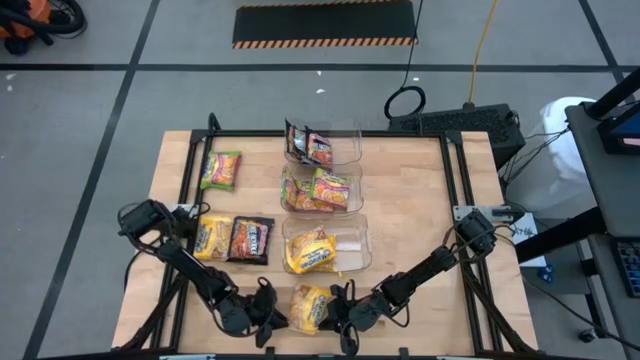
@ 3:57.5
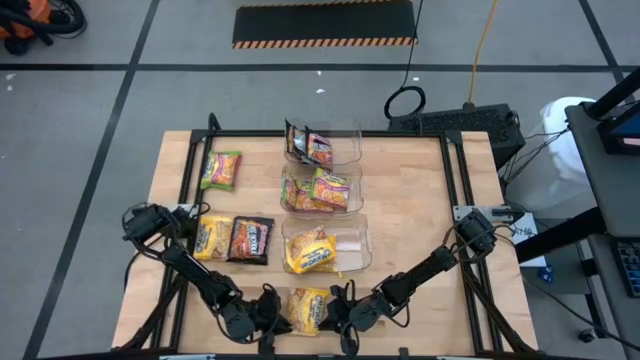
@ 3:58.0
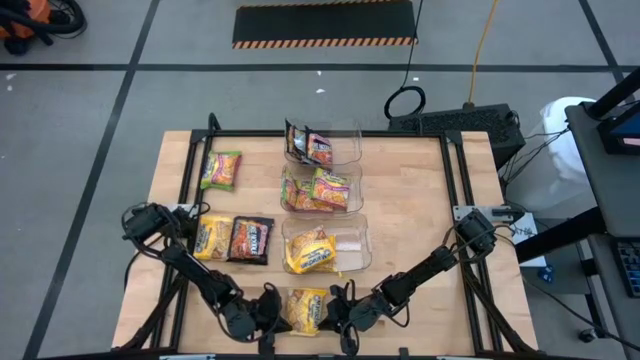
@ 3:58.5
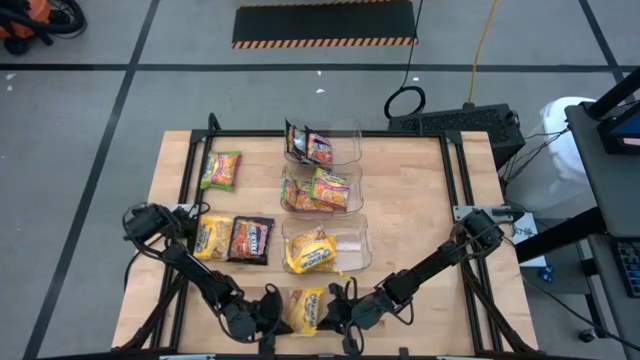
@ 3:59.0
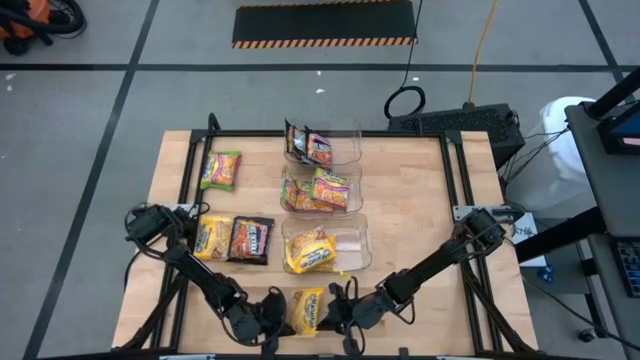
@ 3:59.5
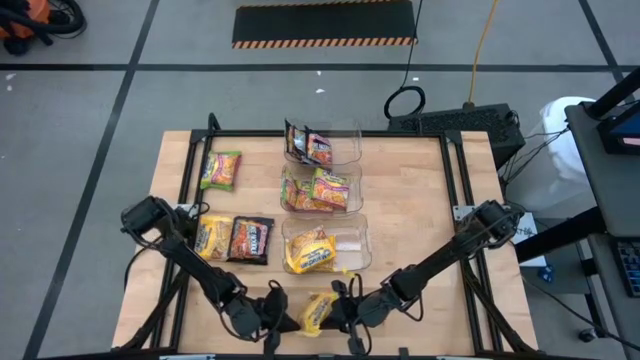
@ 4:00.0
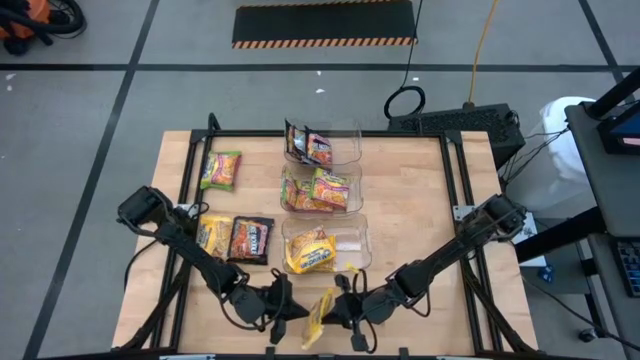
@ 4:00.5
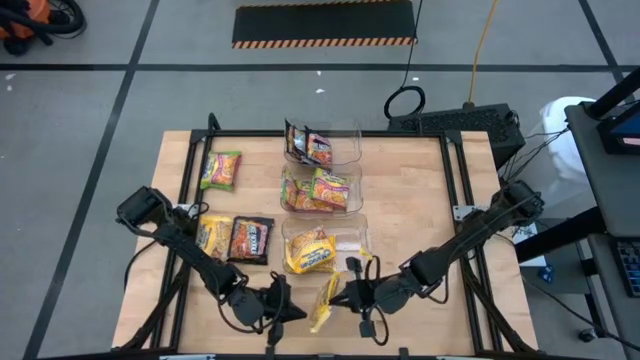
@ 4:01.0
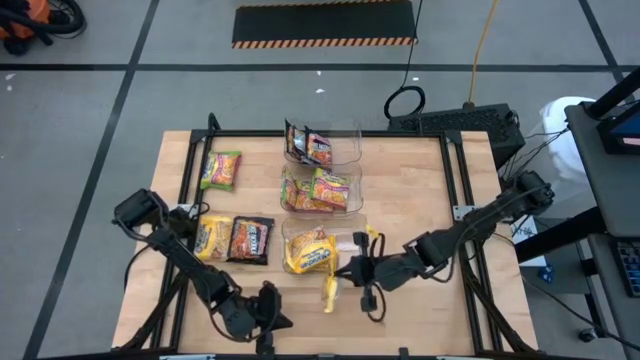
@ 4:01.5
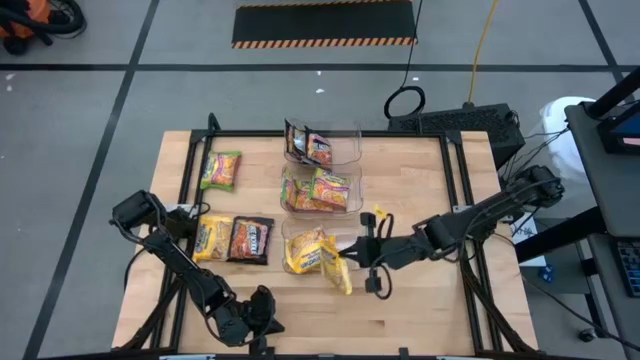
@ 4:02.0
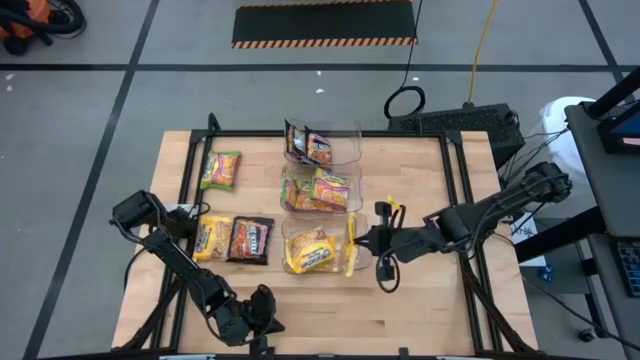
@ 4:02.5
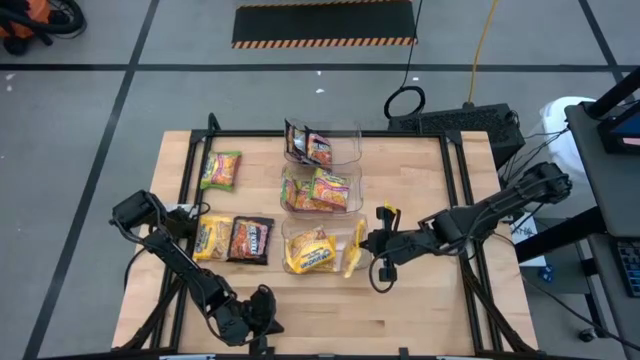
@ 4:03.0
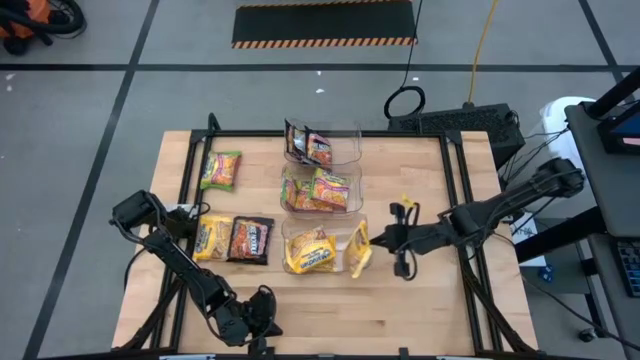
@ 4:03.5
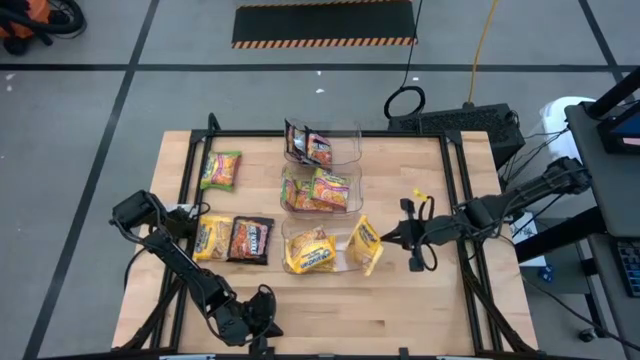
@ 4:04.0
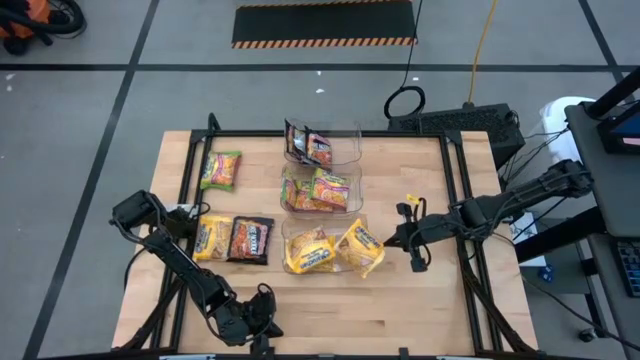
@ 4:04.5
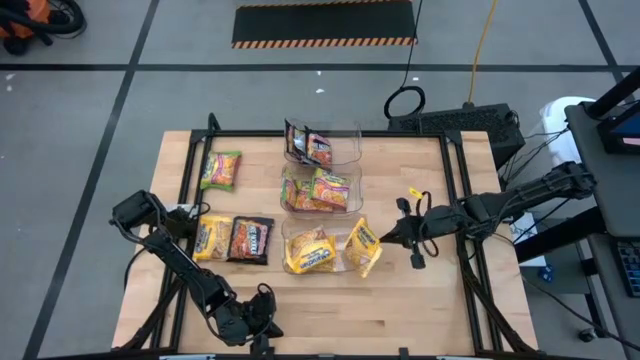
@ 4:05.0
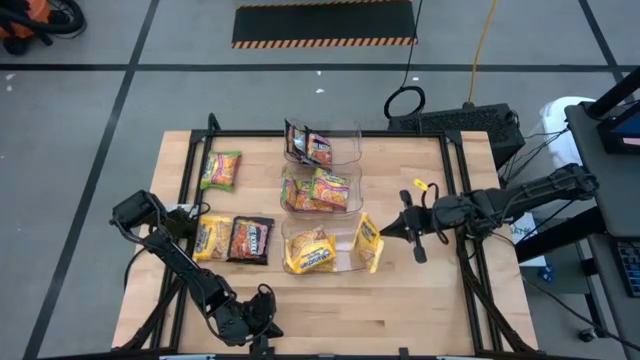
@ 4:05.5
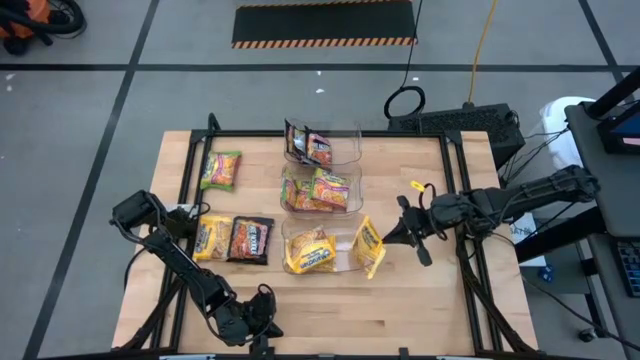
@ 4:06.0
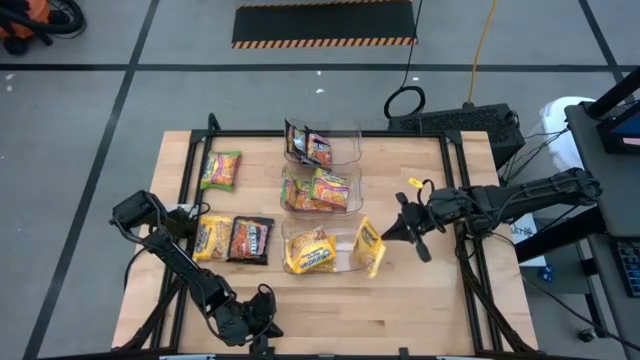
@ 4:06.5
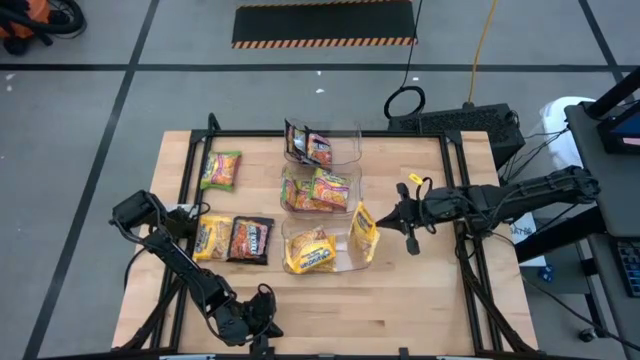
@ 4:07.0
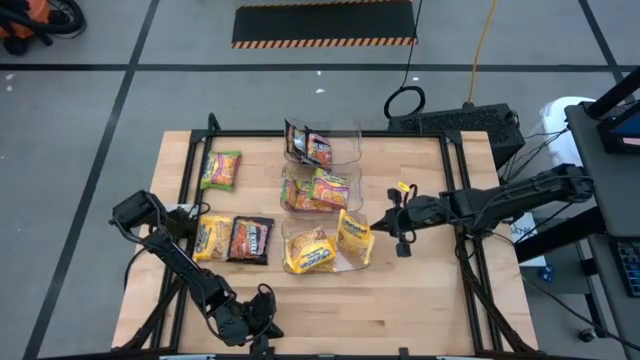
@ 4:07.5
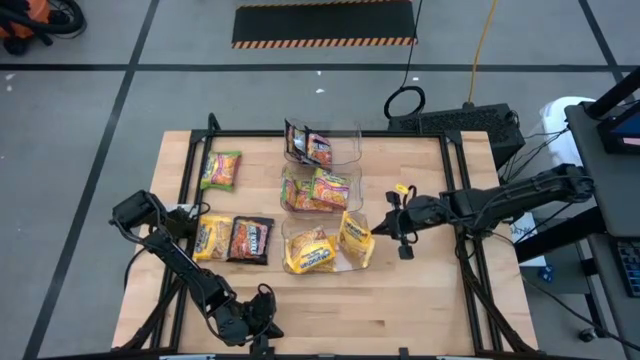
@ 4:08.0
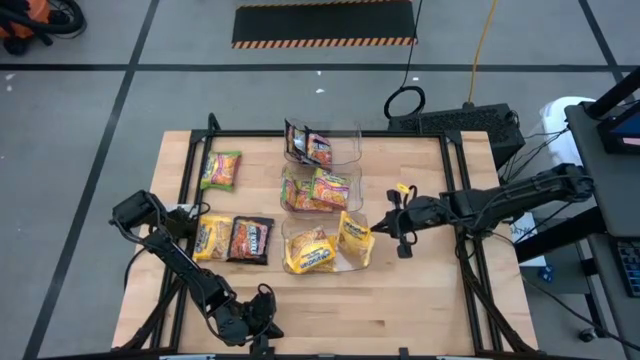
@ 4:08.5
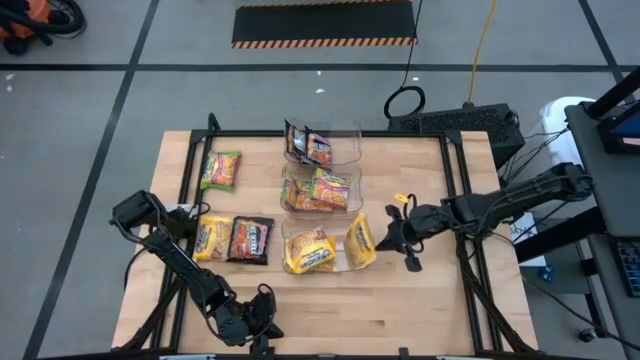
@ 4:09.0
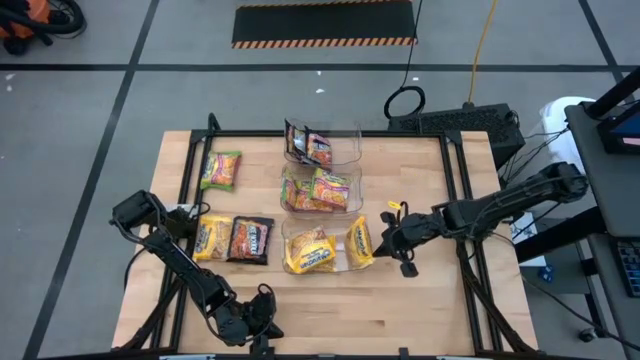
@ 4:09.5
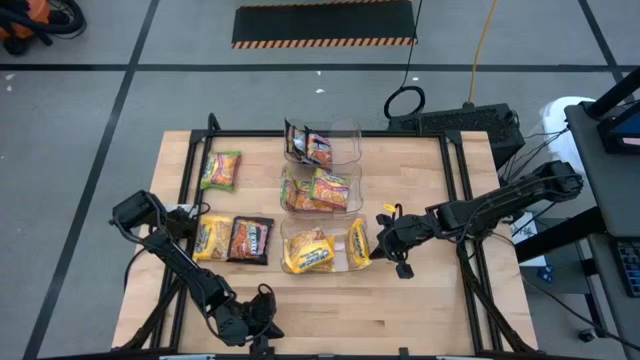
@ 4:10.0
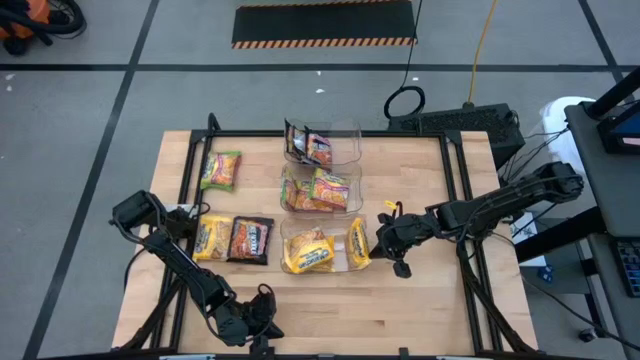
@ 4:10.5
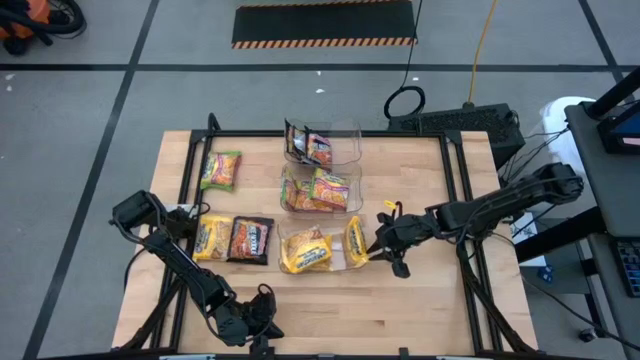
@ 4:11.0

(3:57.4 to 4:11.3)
Task: Sort Maruchan noodles
Put the yellow noodle pack into the bottom transparent bin

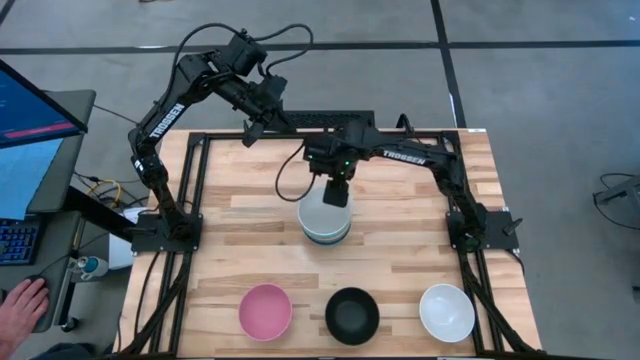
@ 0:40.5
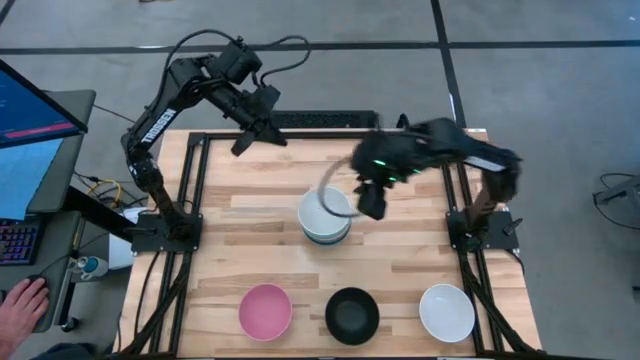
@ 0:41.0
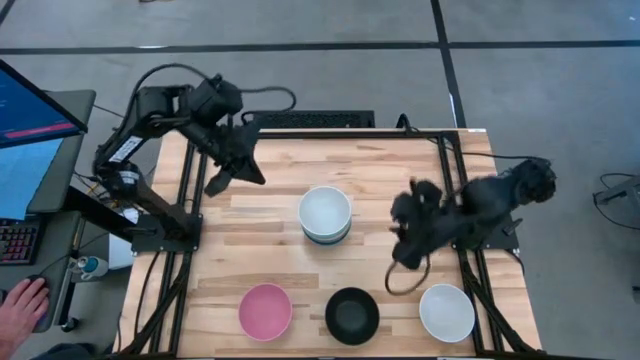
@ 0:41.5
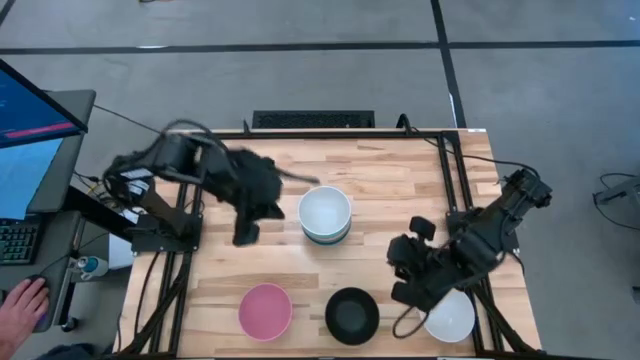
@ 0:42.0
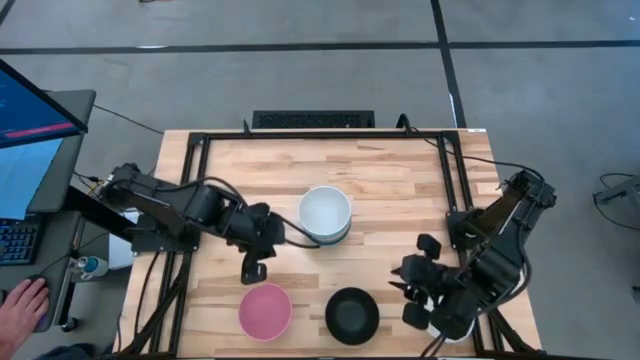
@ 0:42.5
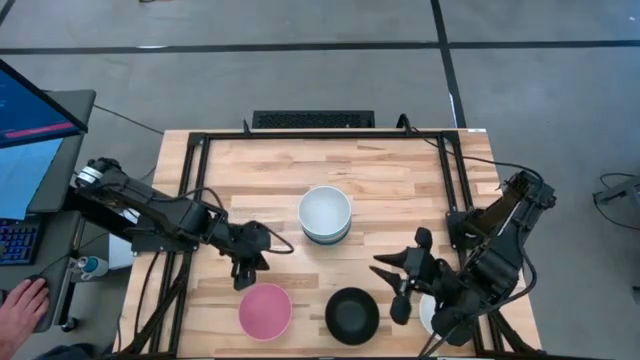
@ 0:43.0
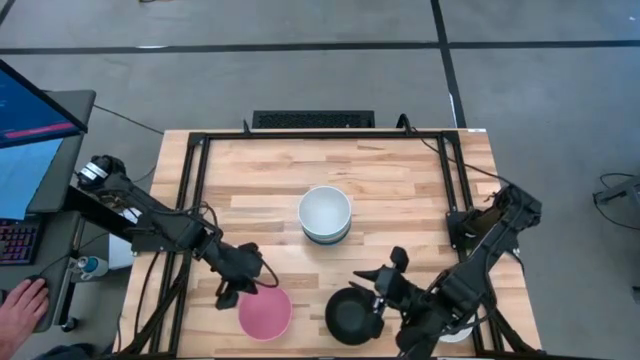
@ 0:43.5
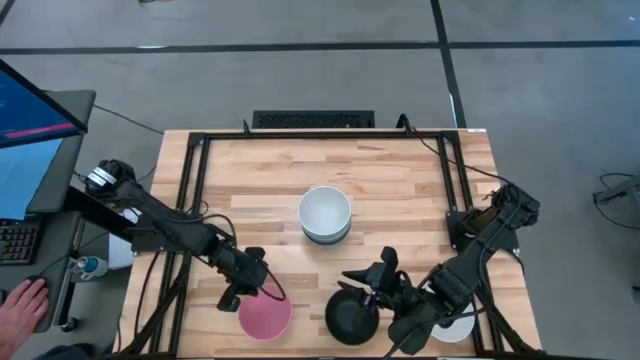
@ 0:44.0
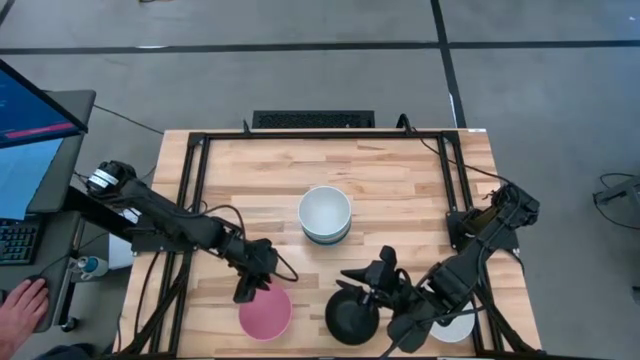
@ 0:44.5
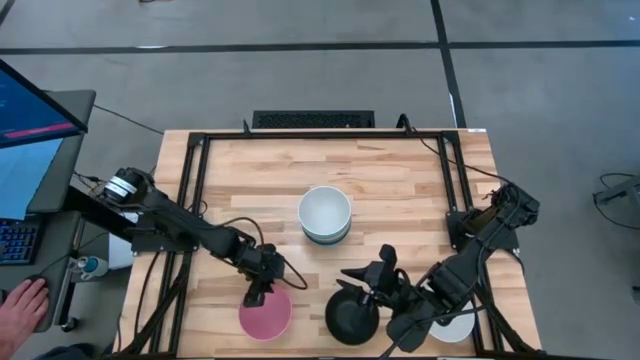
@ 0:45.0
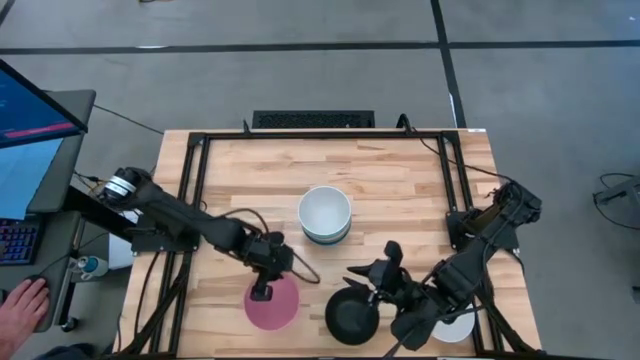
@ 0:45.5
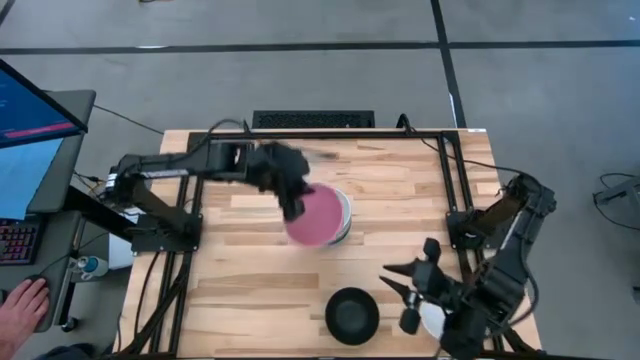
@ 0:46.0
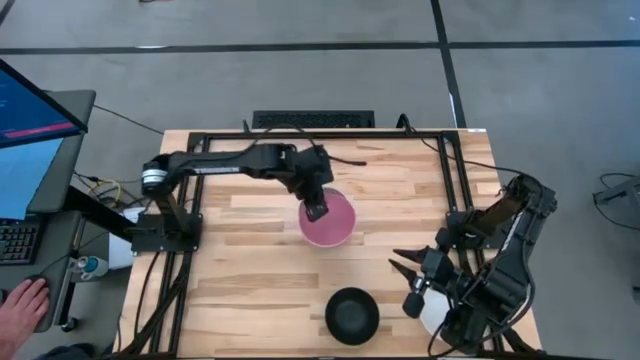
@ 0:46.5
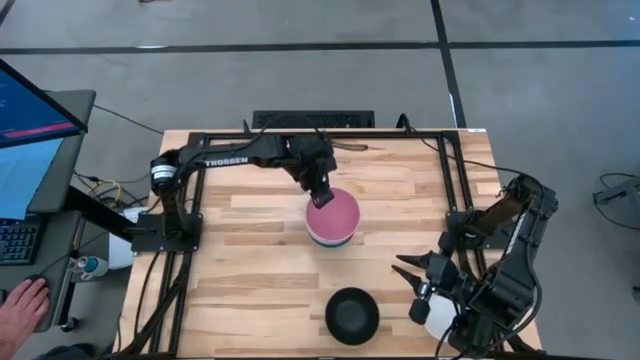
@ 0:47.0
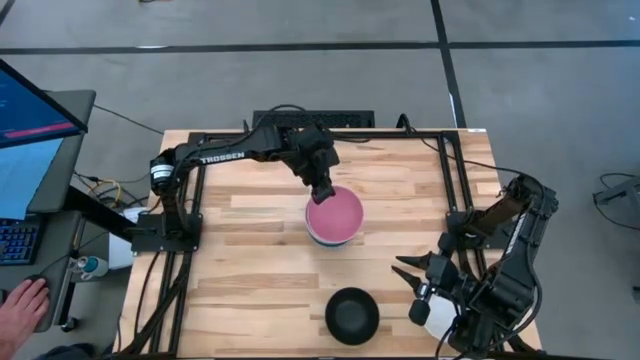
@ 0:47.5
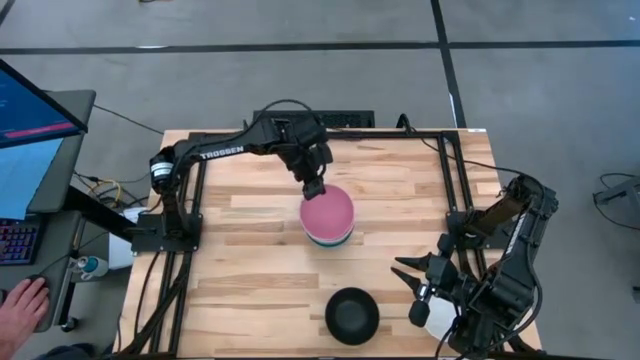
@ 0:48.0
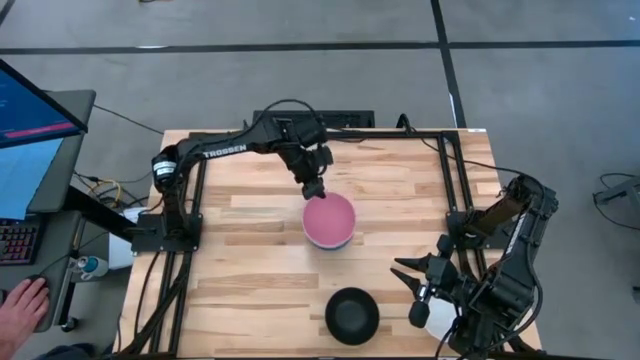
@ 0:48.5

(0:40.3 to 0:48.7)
Task: Nest bowls inside each other
Stack the pink bowl on top of the gray bowl
